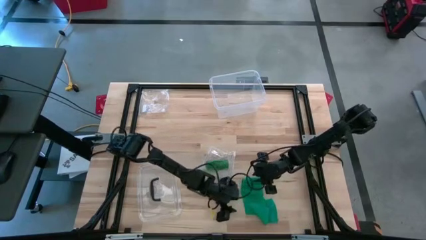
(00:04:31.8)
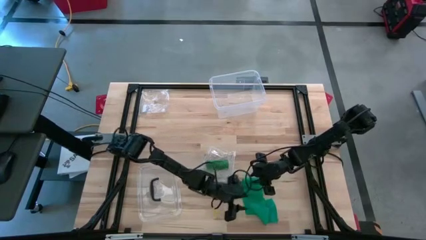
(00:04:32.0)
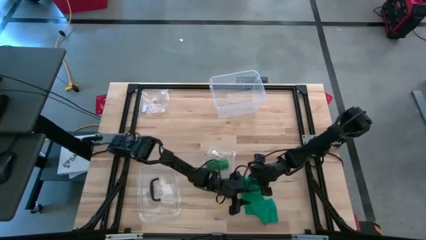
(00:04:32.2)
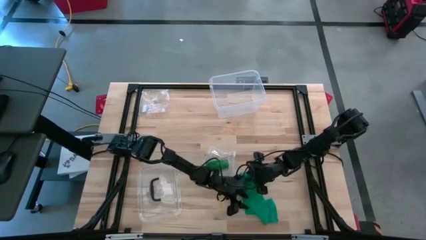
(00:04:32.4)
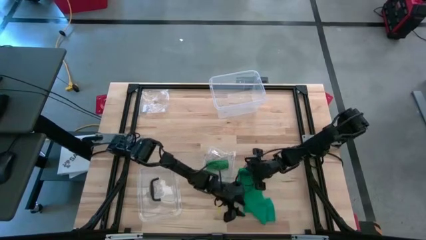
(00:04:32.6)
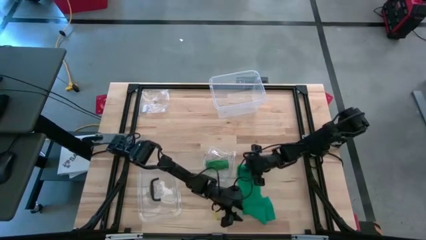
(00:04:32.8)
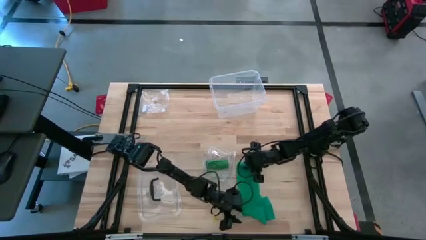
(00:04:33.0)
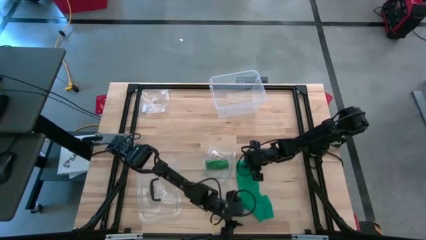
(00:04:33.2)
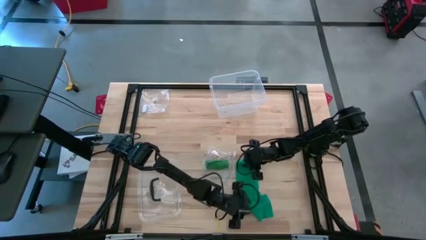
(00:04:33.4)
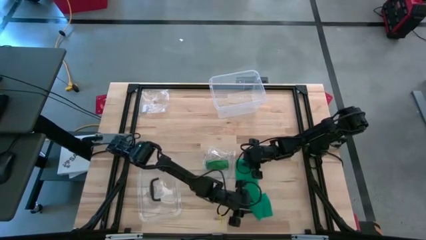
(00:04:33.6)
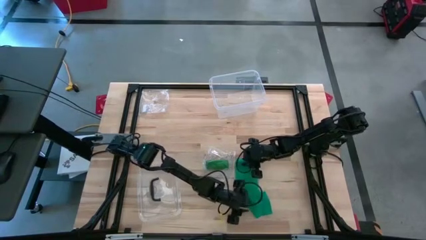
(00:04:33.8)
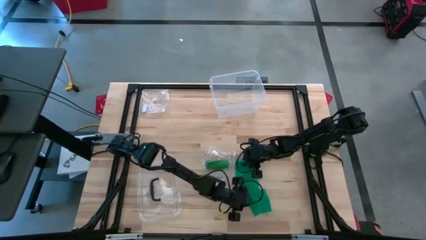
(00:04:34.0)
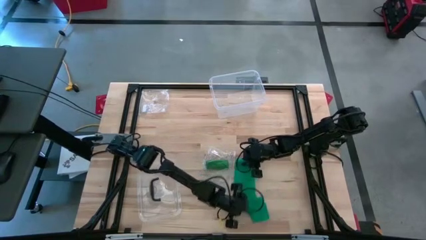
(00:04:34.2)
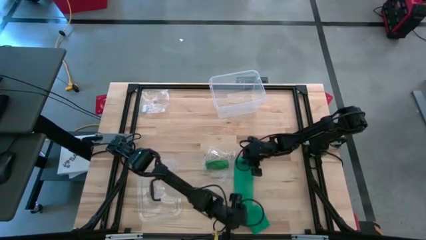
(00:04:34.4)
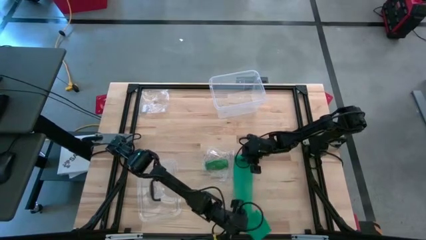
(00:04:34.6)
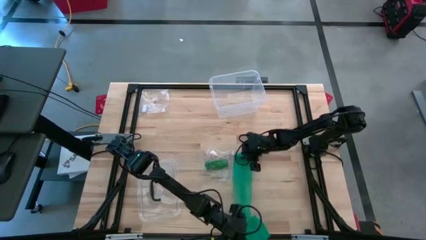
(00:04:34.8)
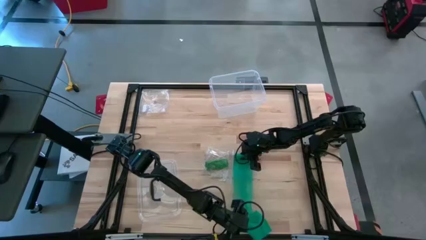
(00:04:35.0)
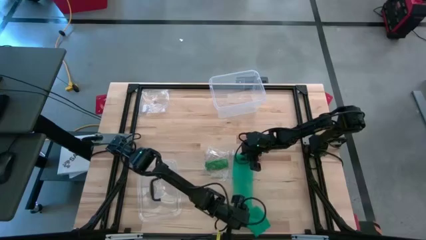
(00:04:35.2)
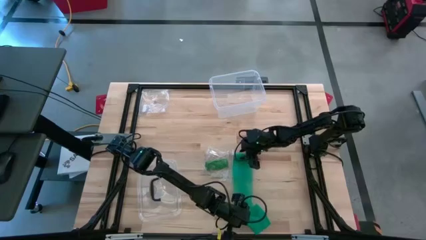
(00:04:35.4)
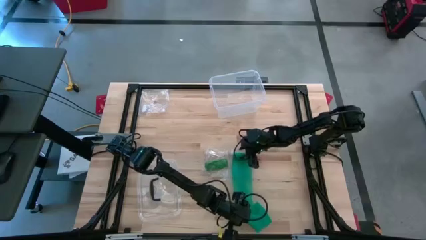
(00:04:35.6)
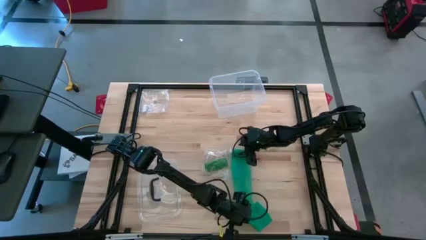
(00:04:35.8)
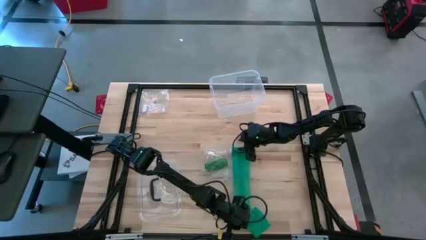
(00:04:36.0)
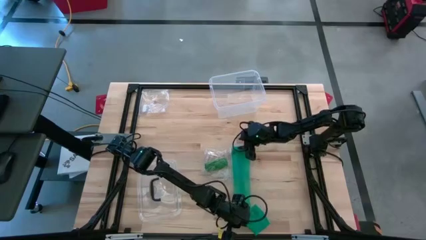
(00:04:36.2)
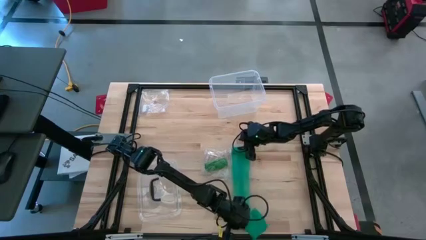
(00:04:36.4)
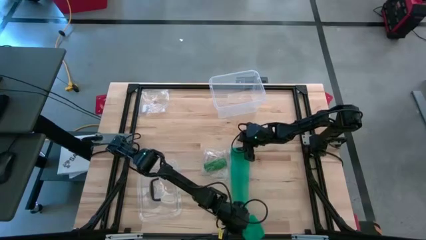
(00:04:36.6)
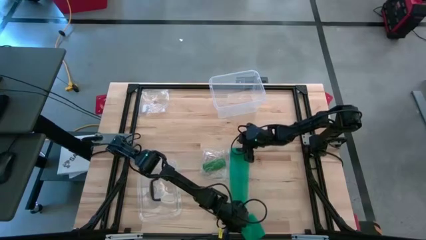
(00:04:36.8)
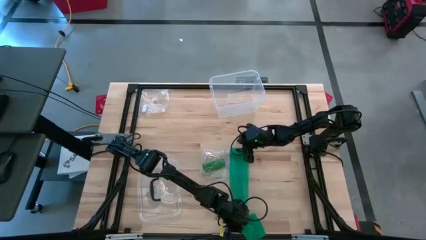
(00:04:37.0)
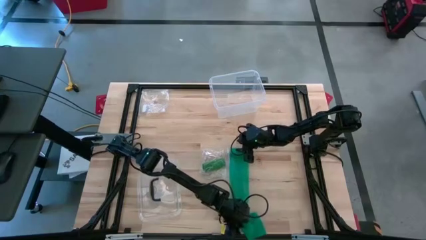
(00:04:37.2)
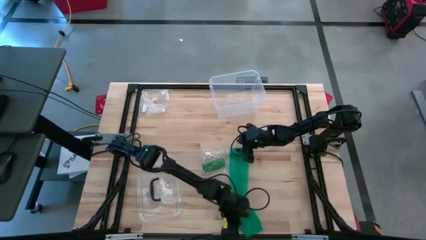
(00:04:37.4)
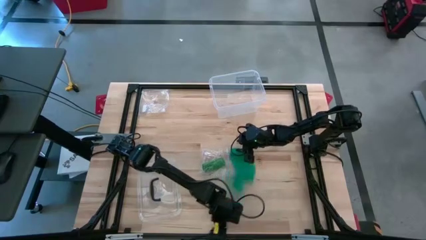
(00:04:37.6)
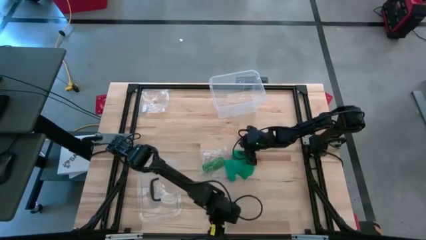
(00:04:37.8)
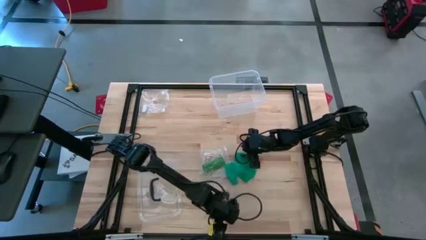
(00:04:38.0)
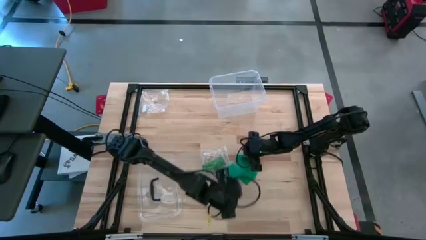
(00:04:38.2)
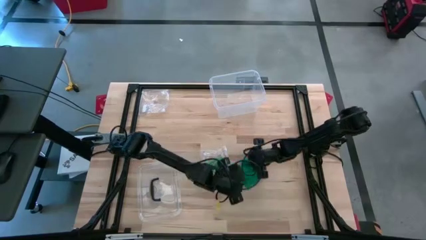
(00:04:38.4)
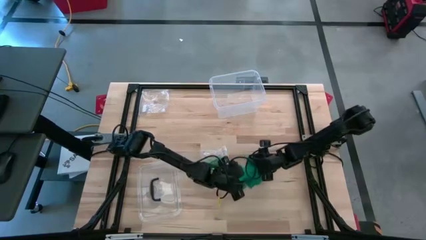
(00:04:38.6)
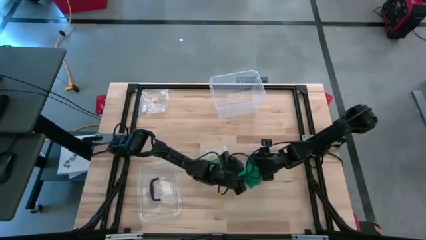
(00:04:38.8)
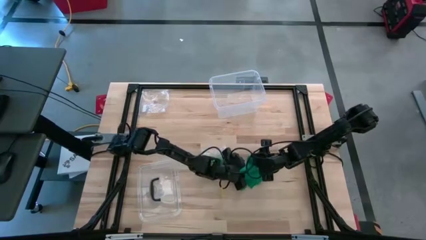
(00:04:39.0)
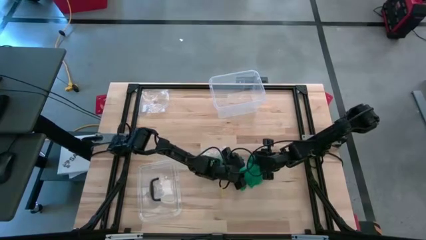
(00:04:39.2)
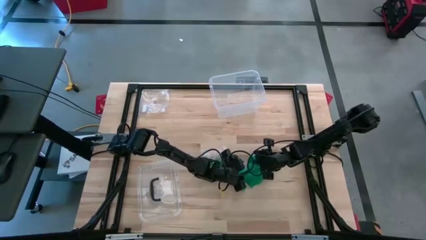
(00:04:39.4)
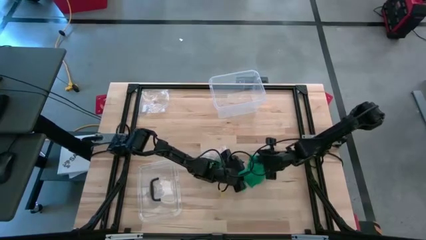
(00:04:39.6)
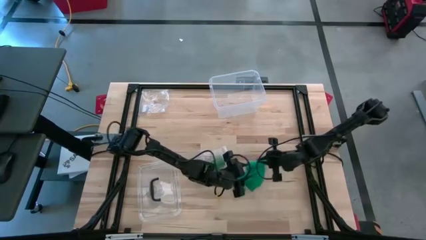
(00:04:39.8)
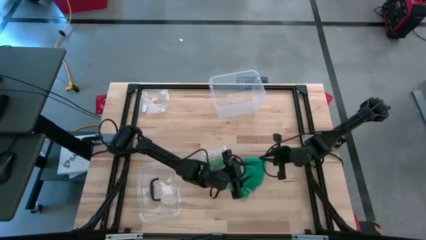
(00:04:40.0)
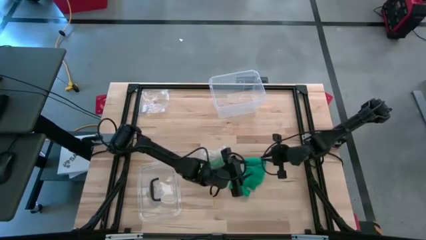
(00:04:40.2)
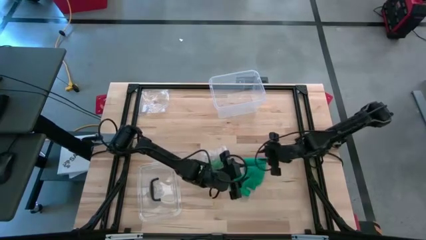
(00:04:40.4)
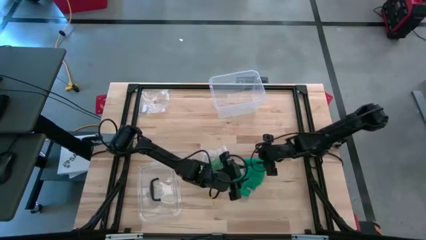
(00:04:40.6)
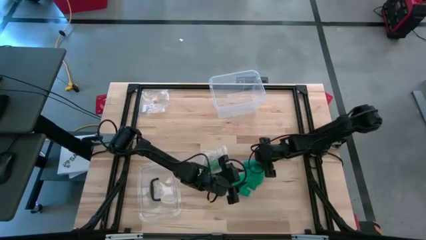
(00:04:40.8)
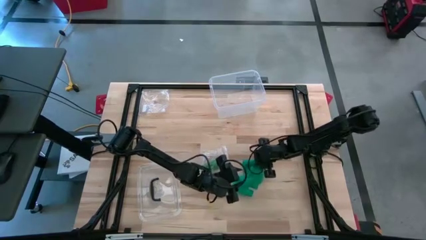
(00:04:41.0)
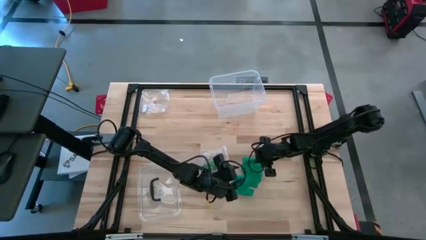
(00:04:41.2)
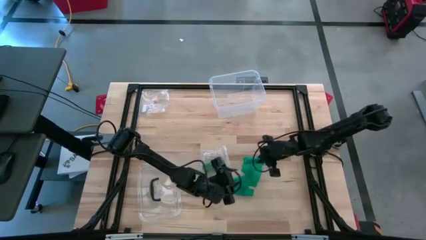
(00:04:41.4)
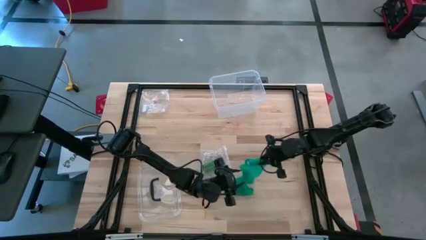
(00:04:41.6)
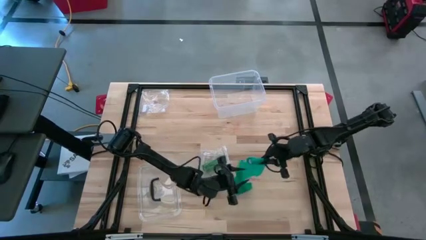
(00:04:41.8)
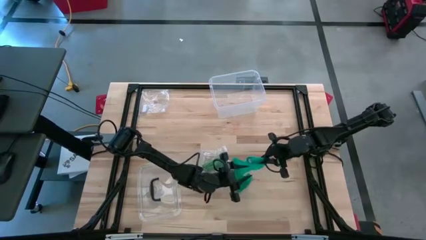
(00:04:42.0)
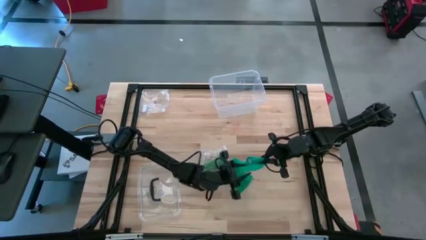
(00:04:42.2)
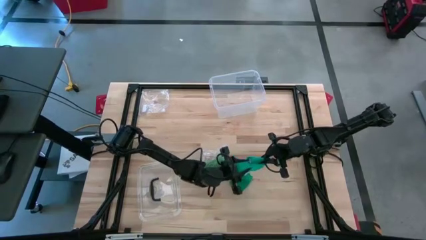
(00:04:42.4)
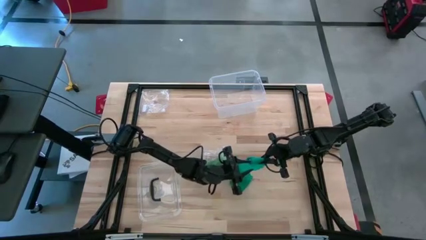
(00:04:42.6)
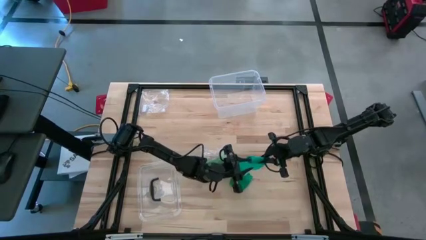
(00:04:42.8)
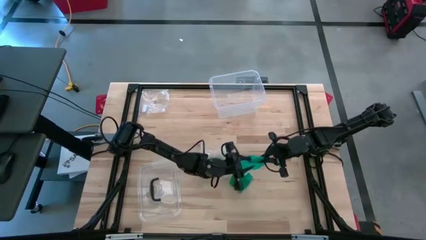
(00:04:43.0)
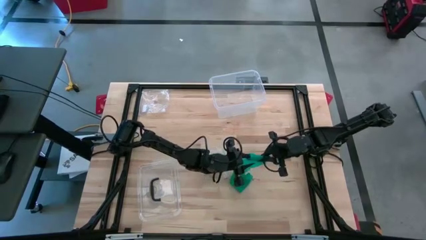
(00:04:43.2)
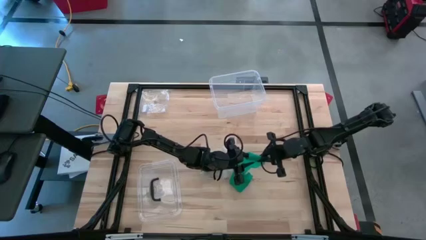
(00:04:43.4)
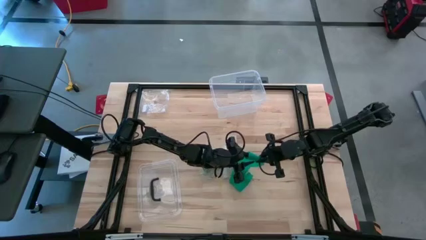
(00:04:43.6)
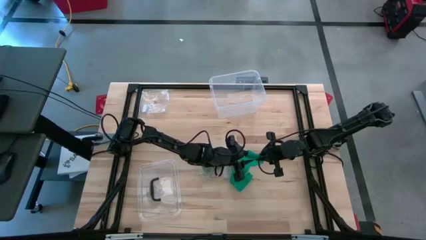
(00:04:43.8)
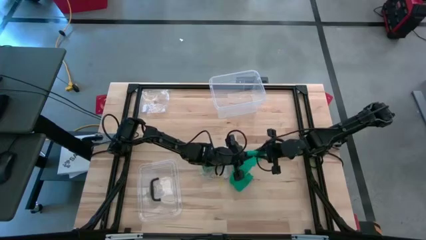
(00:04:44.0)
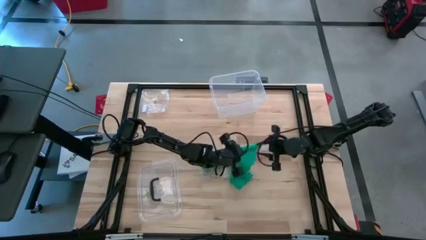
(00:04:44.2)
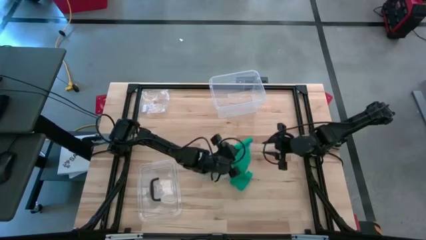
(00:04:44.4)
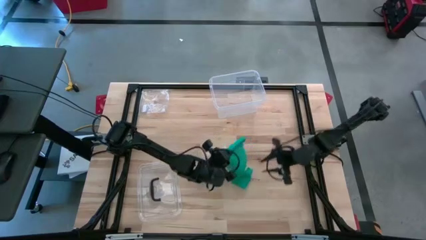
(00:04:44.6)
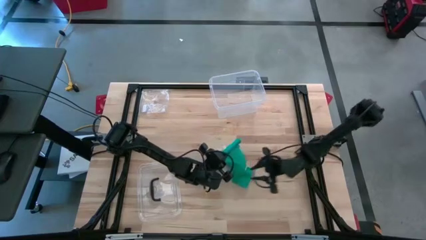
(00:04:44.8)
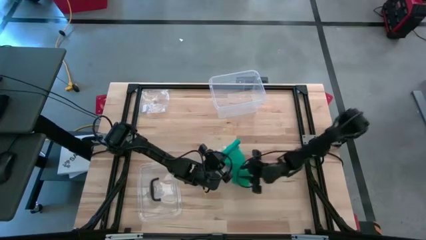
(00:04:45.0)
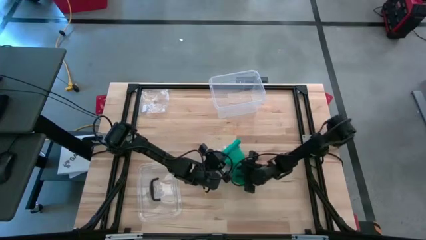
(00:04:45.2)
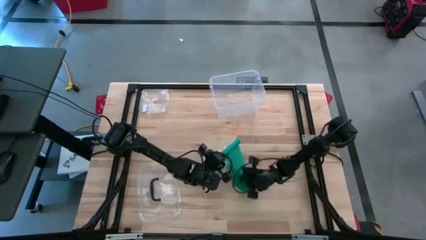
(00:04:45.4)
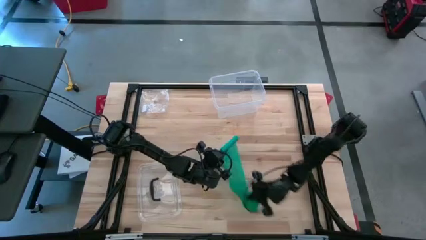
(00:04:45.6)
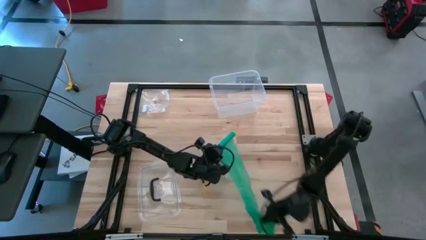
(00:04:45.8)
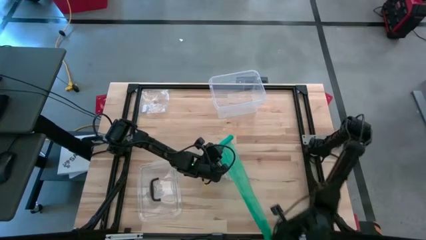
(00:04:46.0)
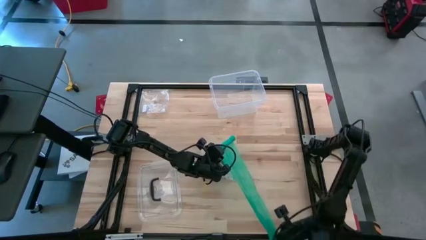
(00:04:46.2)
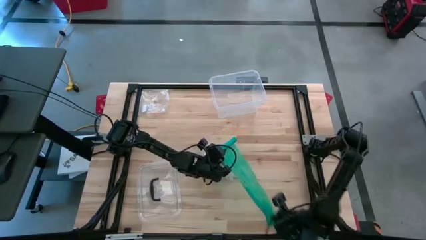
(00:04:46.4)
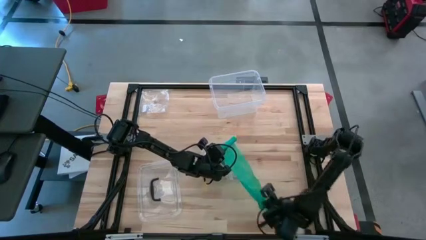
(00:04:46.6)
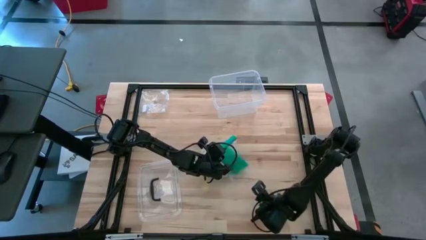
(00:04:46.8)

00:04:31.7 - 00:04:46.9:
Task: Roll bandage
Roll the blue bandage

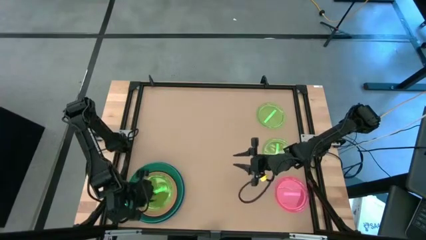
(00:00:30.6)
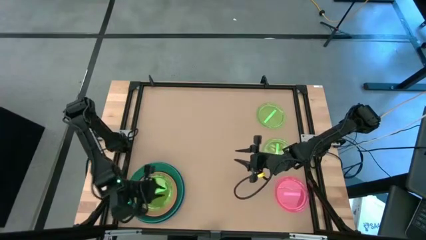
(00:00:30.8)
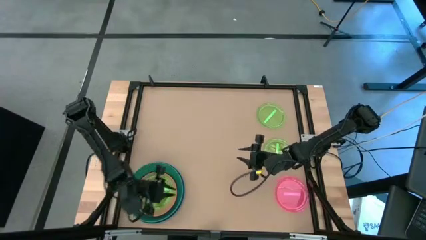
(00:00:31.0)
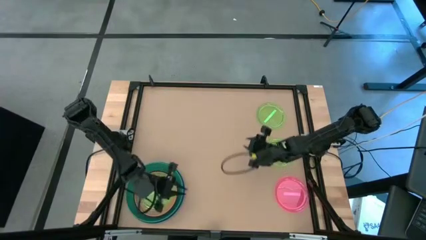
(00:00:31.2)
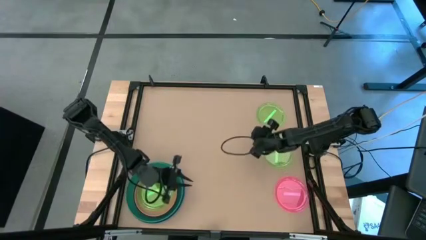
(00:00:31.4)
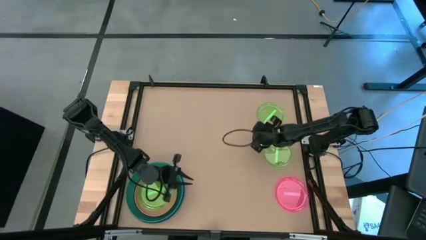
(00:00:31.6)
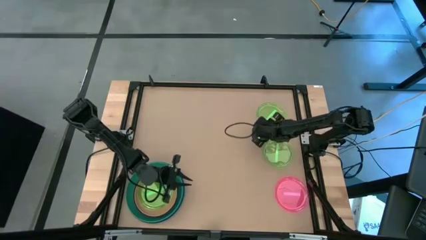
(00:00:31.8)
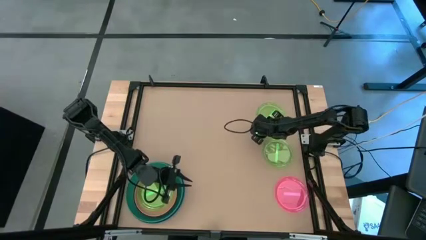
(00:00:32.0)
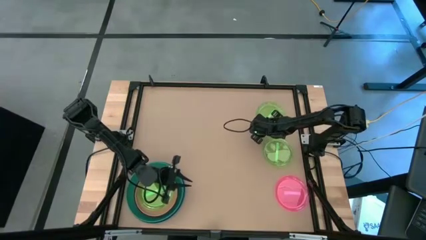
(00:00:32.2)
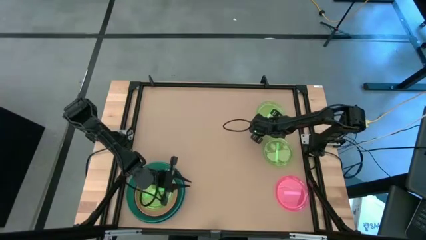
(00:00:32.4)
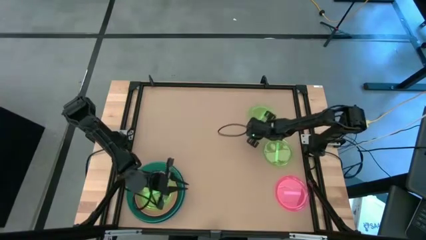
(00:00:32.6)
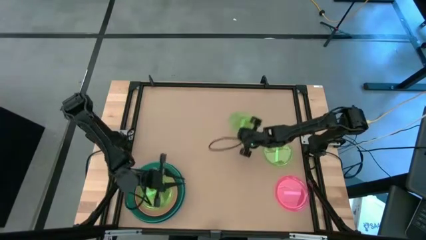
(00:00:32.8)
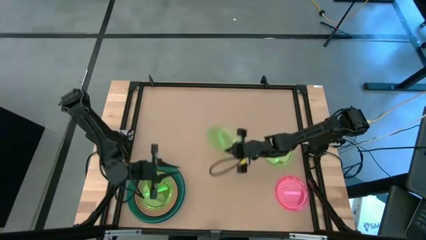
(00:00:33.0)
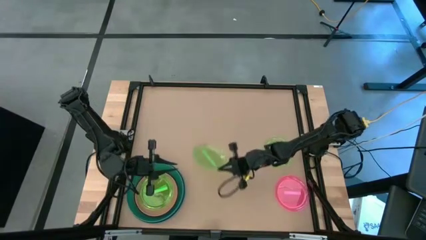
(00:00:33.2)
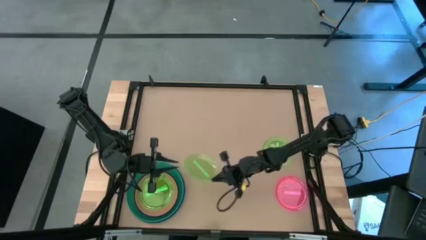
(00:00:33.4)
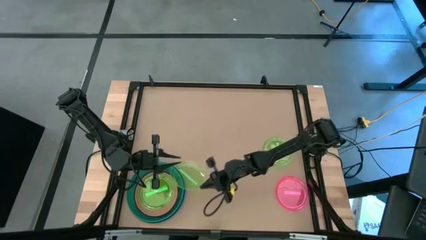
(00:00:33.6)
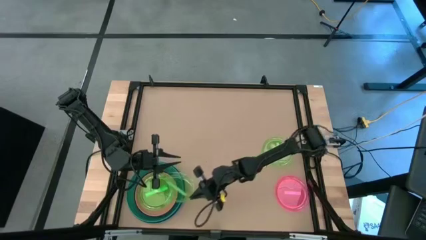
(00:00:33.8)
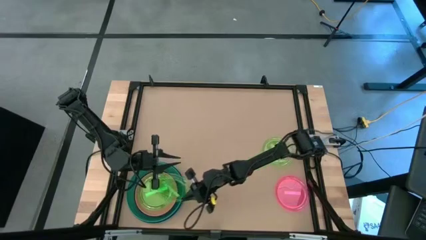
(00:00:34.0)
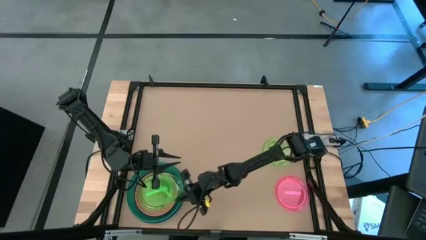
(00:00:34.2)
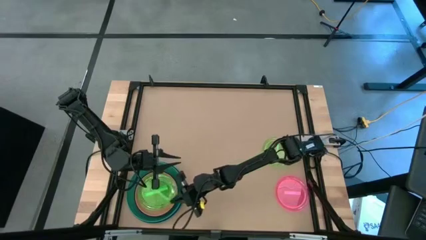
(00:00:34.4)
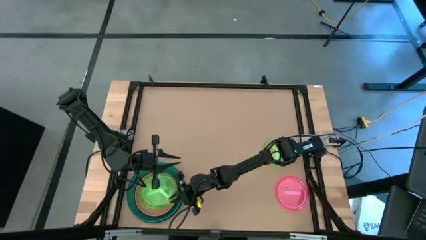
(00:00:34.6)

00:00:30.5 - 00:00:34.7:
Task: Stack plastic plates
Stack the green plate on top of the green plate
